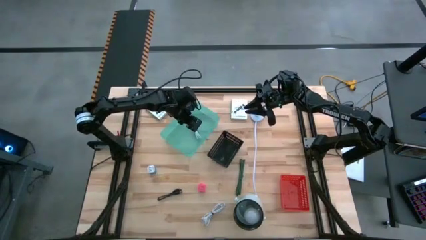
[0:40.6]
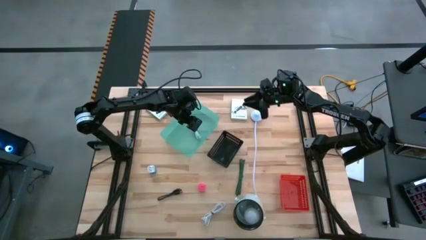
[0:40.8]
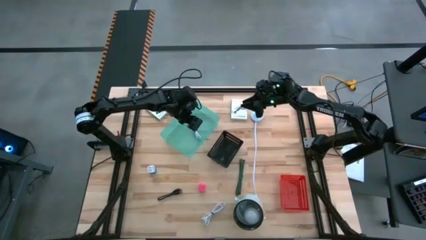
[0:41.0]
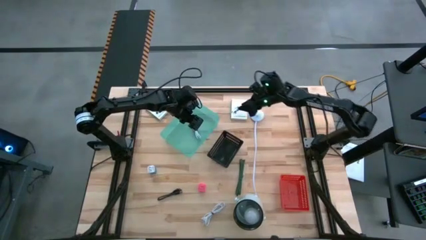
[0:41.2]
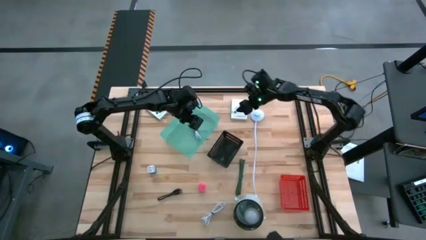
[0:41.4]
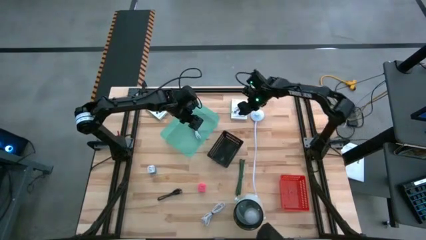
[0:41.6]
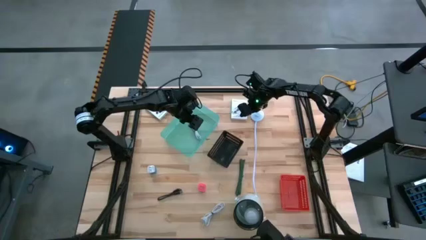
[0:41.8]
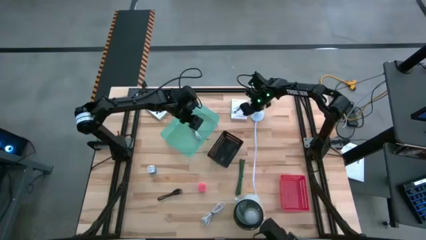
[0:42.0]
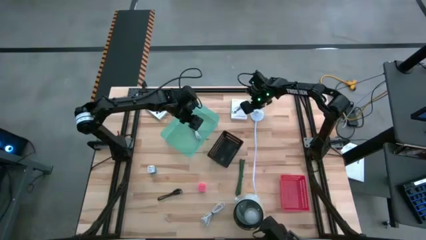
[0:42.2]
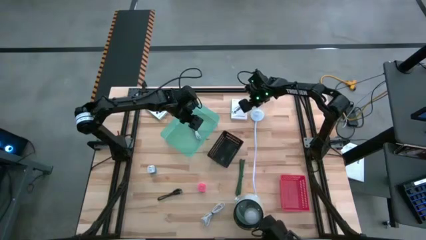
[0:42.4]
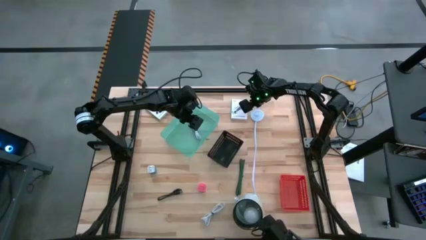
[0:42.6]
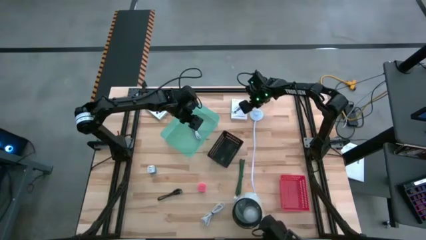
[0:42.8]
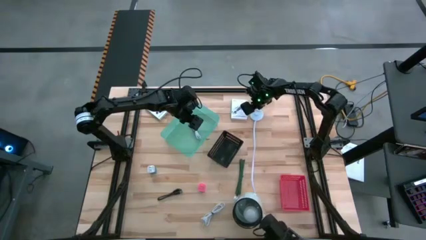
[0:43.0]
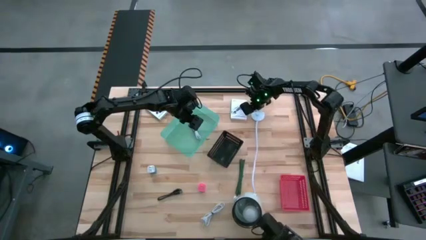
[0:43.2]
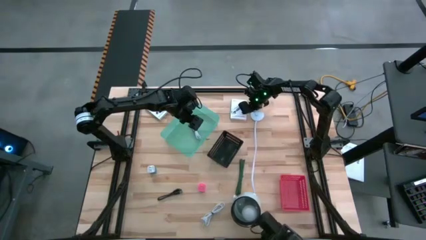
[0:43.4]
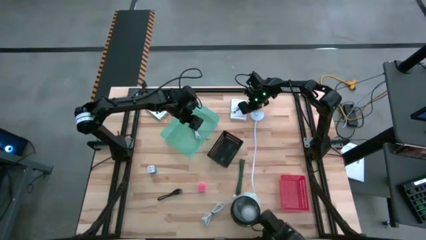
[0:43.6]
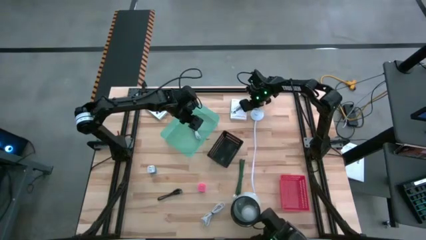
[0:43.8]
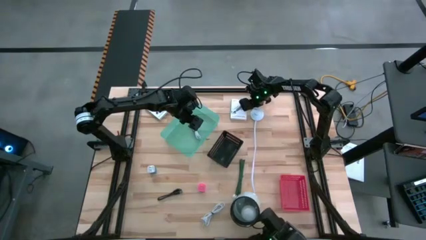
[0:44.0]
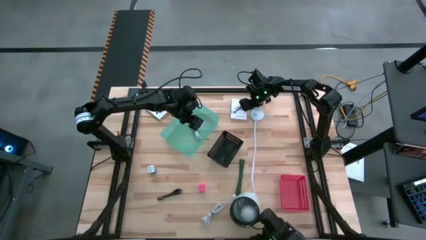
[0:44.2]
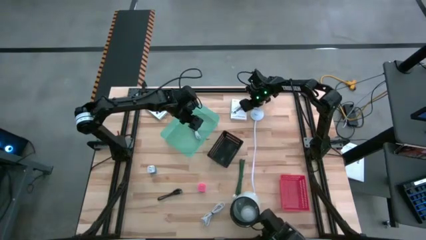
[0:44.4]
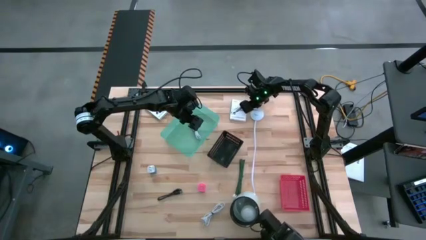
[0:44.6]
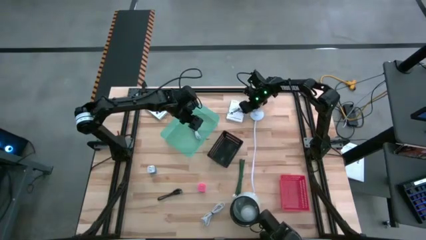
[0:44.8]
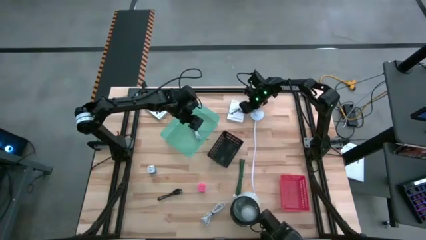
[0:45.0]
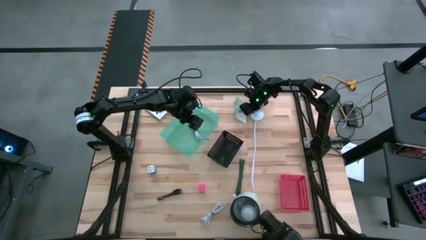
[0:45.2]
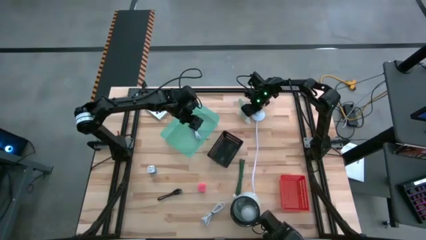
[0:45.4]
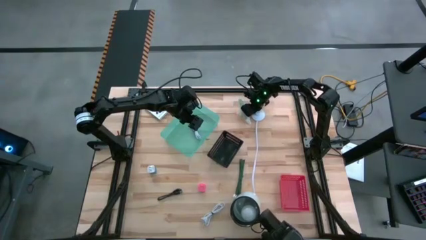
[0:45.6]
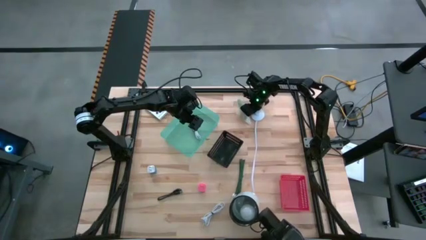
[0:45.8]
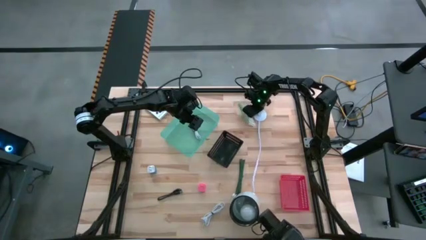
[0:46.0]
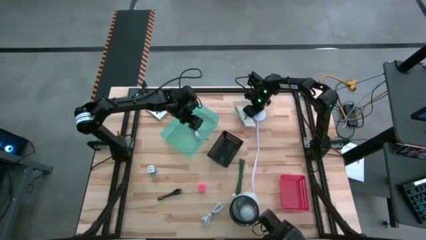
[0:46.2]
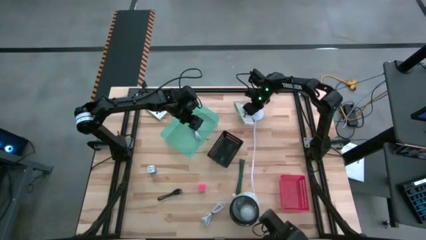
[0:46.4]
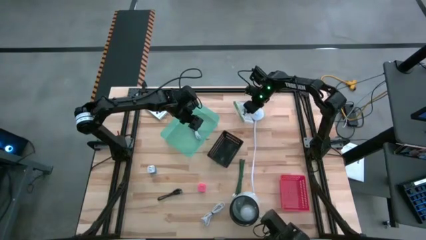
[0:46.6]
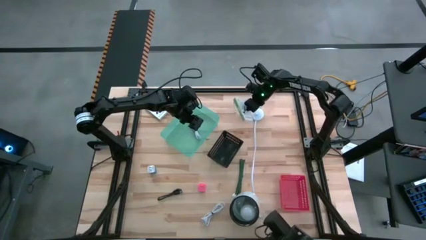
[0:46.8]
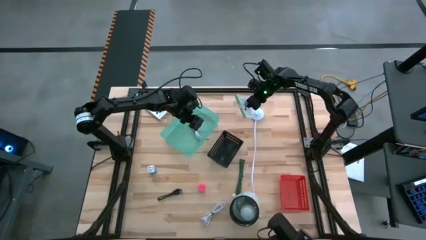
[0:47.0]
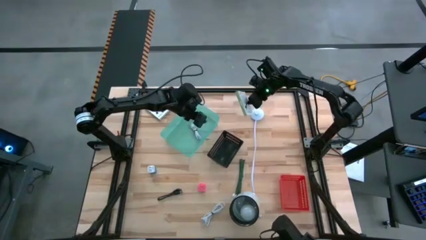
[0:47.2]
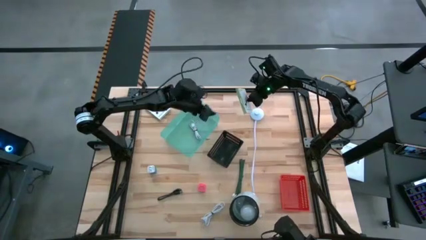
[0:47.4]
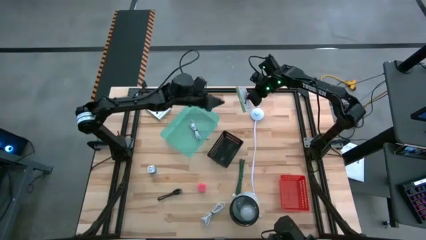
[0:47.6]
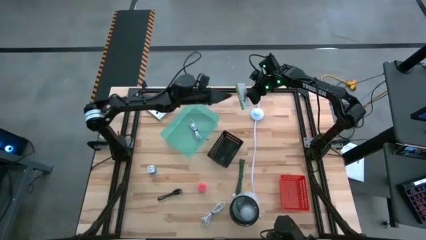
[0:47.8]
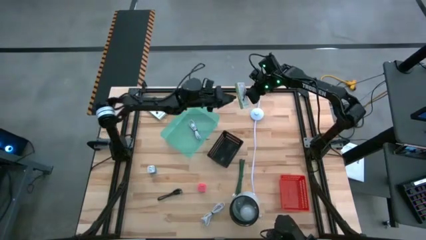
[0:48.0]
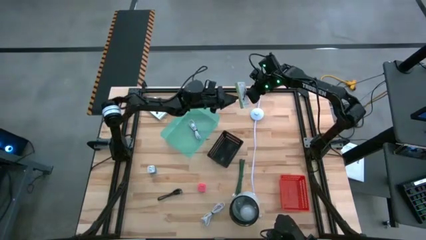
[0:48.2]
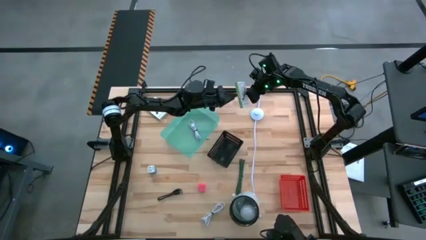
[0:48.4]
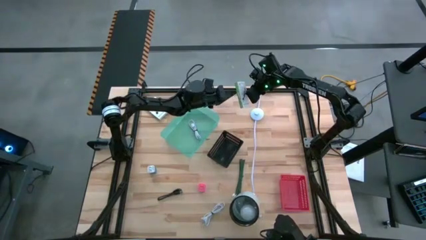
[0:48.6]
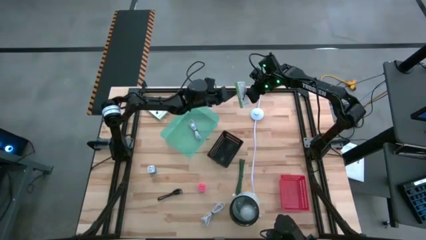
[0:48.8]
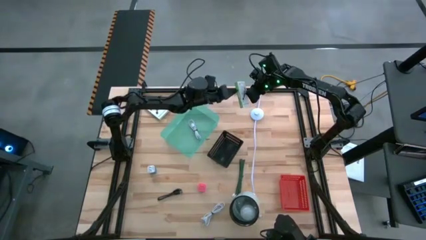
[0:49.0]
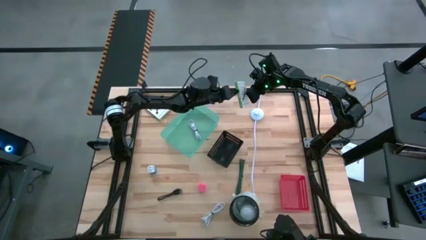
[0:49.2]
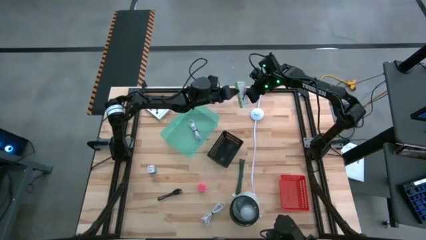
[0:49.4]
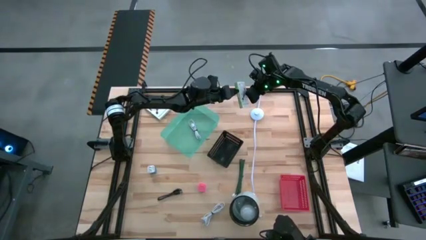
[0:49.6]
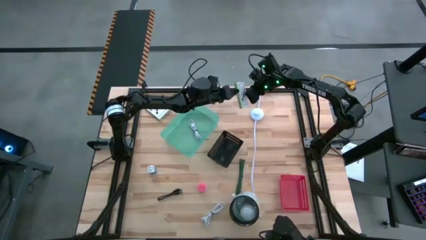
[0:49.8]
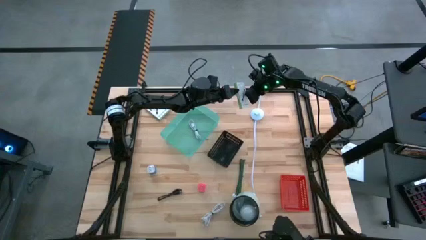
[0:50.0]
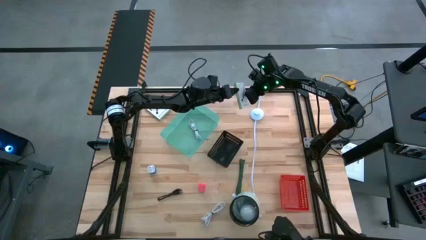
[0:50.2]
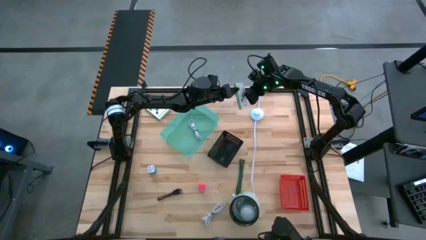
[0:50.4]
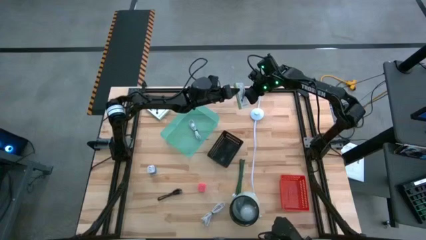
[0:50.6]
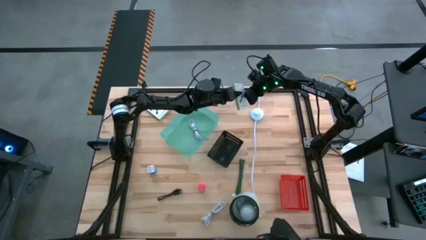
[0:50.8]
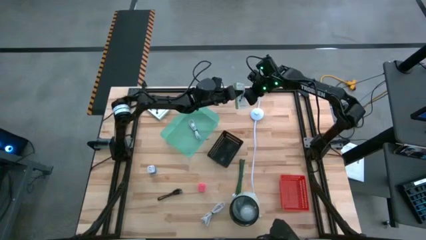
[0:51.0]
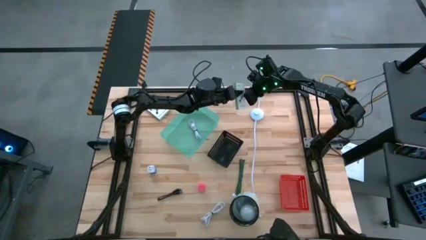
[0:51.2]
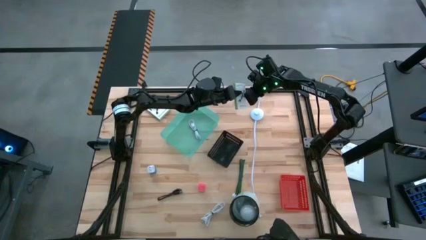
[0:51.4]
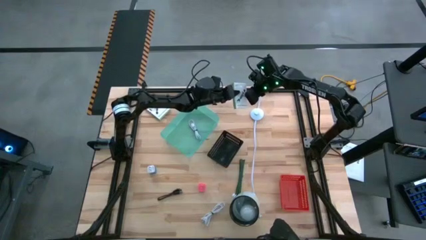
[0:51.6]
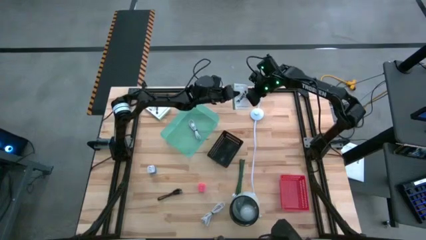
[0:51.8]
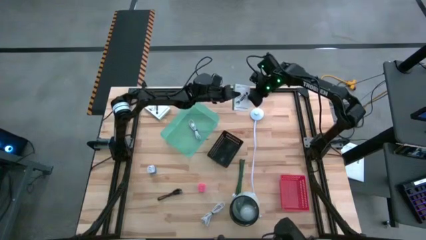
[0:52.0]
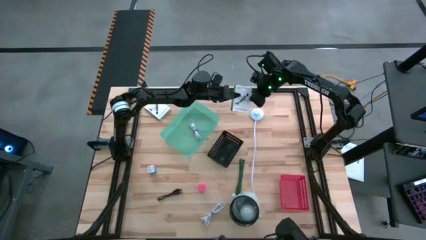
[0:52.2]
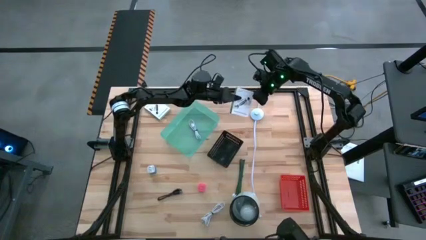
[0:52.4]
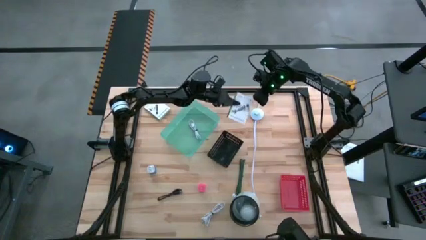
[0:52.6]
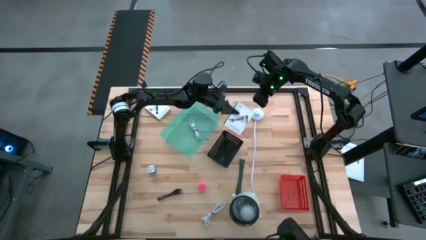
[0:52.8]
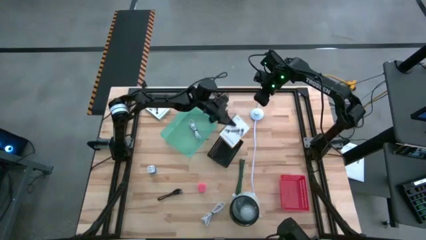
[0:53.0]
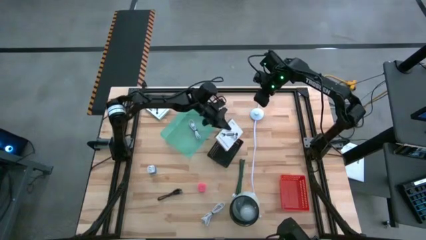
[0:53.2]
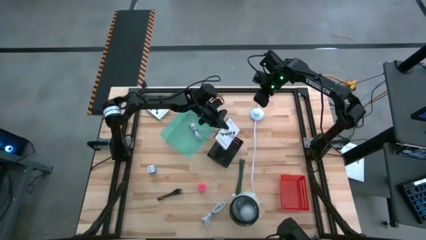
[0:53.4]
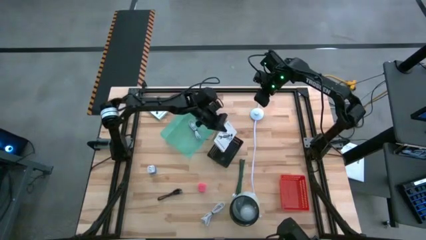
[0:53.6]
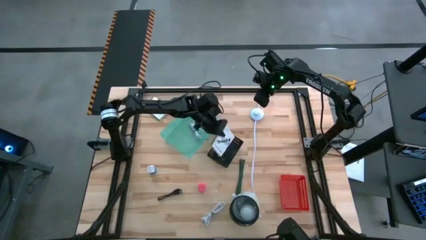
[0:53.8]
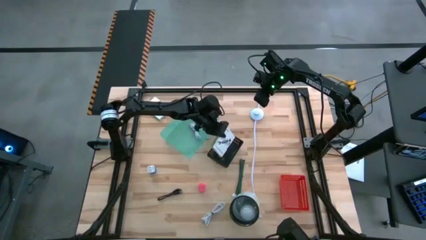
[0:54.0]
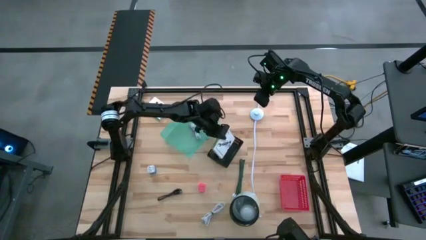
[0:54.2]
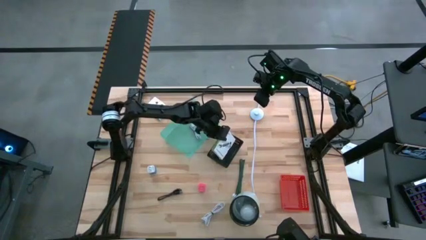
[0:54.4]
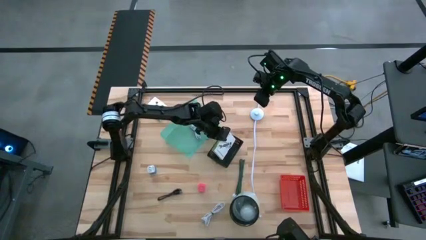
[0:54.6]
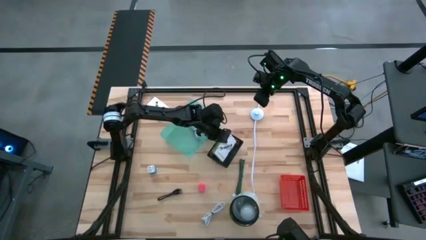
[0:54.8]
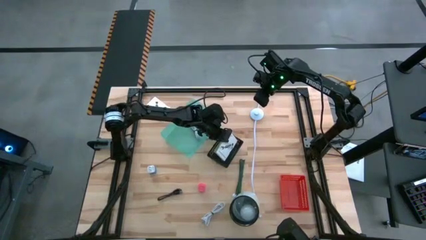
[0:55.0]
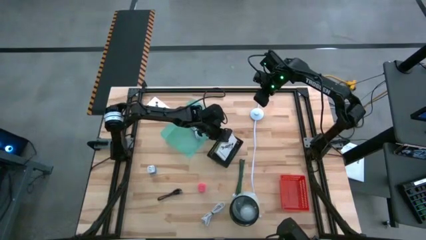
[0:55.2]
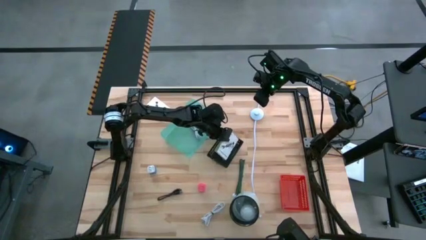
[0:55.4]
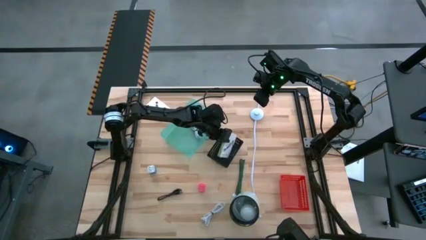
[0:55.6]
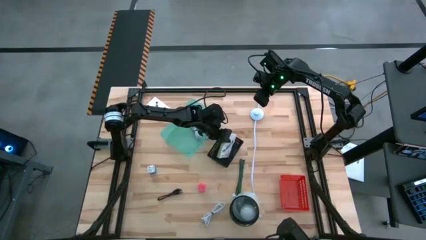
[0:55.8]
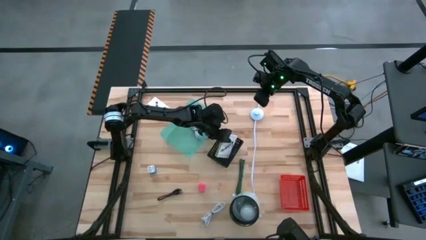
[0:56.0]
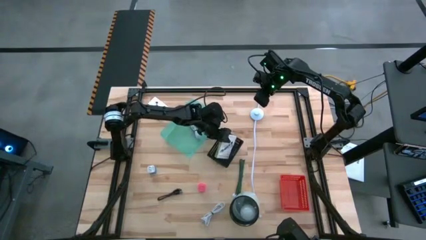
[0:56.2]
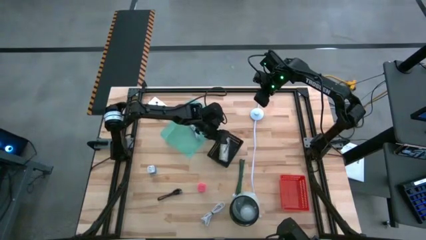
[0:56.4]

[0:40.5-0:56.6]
Task: Pick and place items into bin
Put the right white box into the black bin
